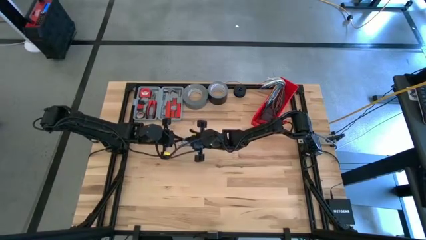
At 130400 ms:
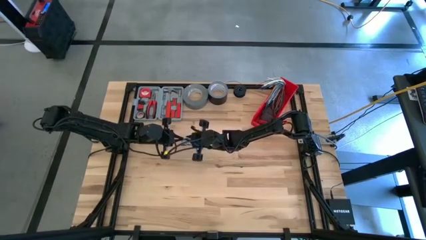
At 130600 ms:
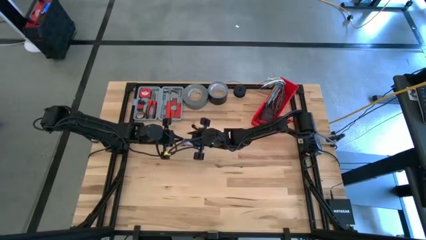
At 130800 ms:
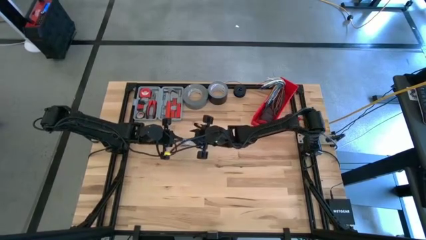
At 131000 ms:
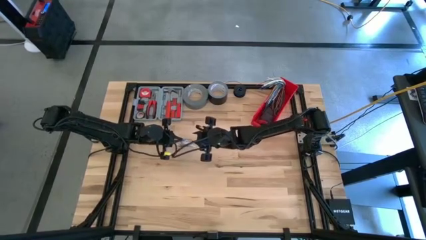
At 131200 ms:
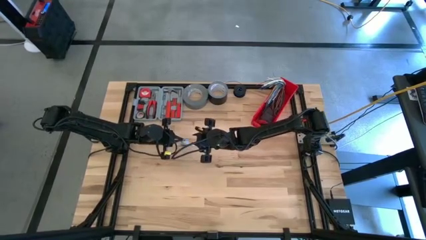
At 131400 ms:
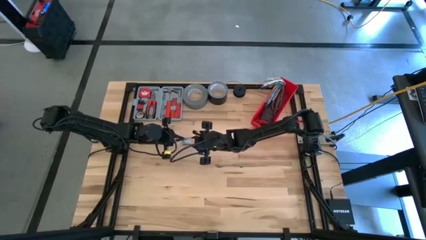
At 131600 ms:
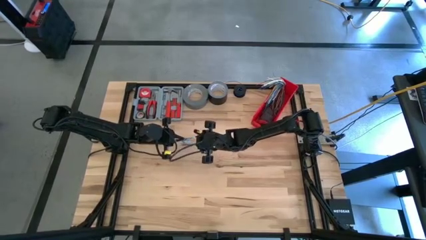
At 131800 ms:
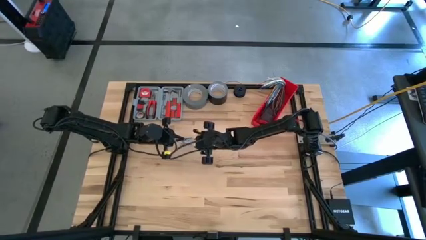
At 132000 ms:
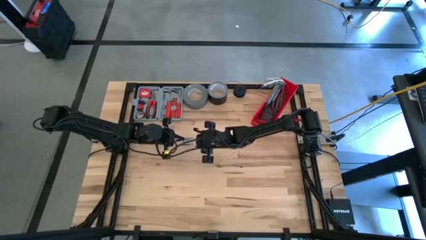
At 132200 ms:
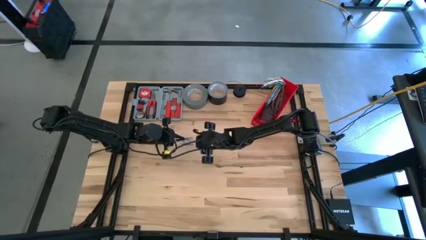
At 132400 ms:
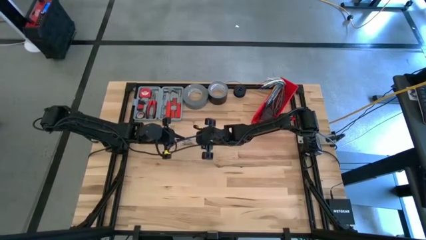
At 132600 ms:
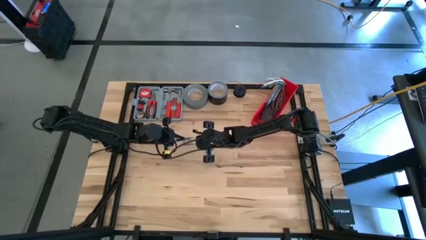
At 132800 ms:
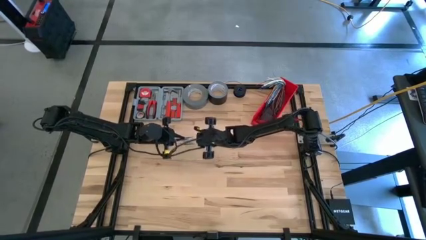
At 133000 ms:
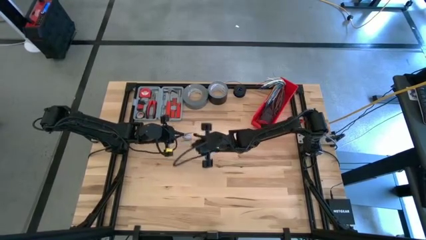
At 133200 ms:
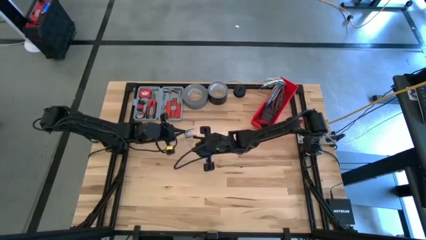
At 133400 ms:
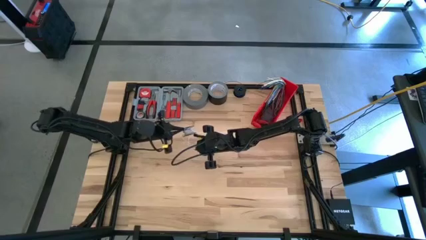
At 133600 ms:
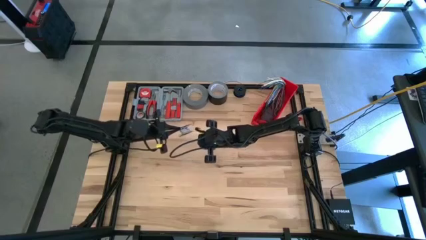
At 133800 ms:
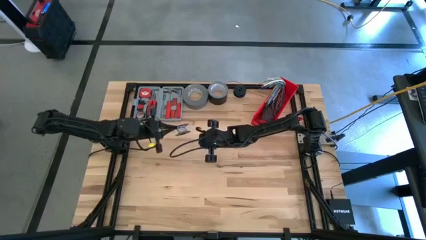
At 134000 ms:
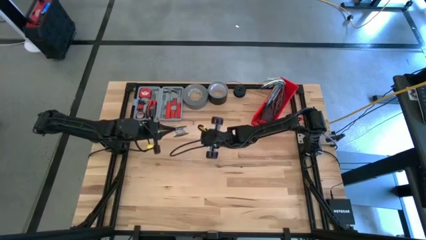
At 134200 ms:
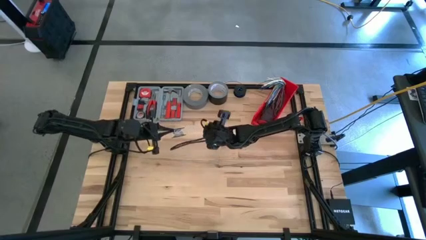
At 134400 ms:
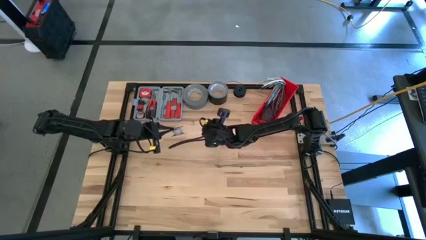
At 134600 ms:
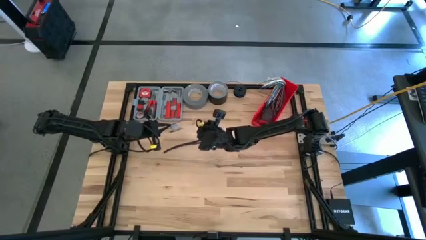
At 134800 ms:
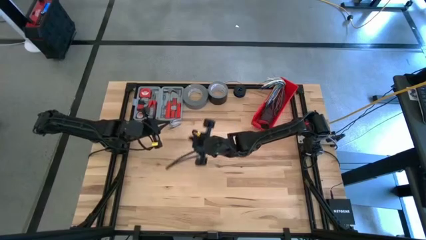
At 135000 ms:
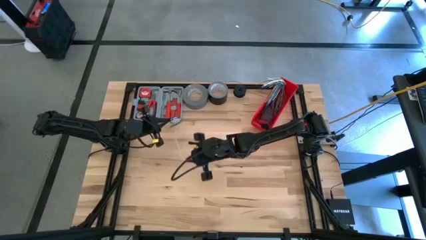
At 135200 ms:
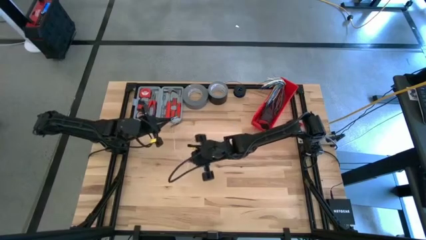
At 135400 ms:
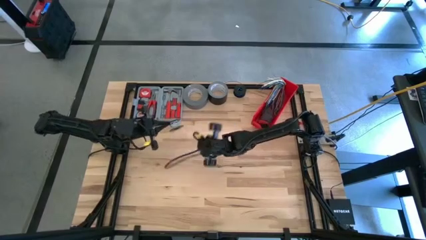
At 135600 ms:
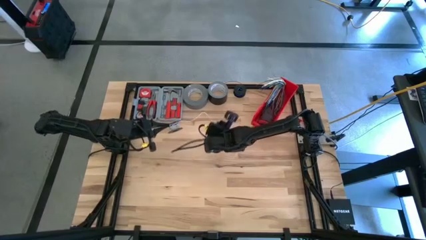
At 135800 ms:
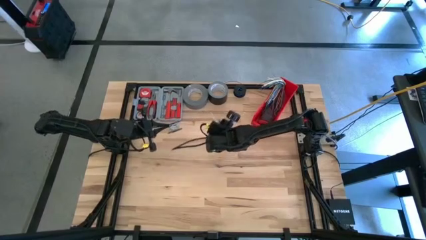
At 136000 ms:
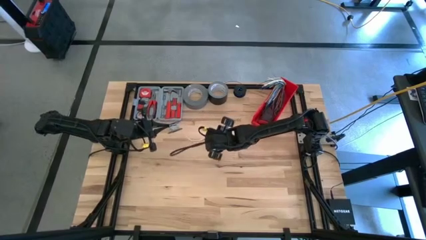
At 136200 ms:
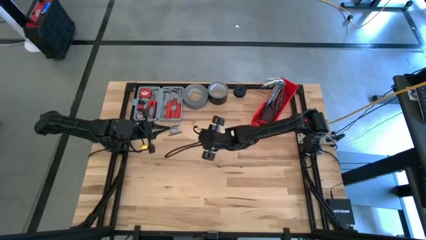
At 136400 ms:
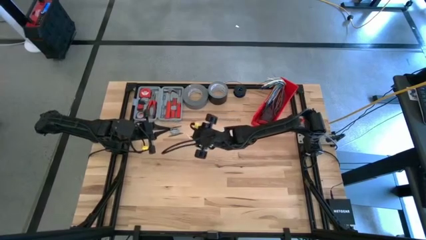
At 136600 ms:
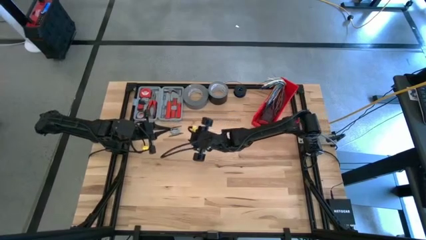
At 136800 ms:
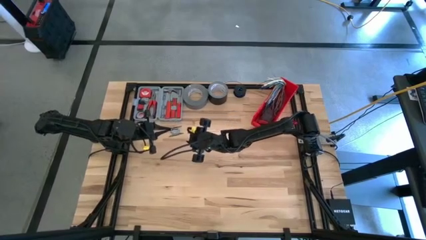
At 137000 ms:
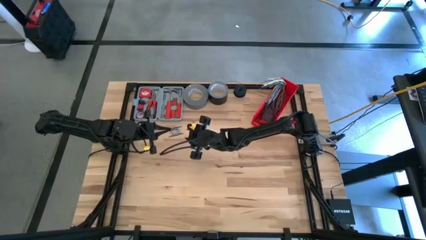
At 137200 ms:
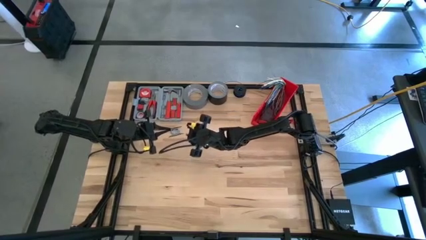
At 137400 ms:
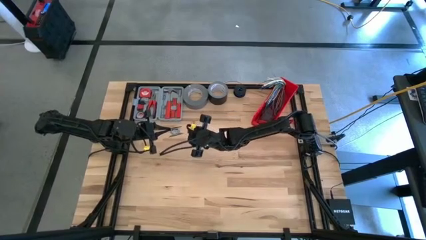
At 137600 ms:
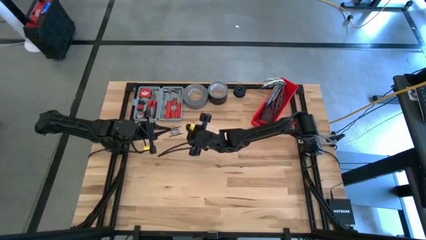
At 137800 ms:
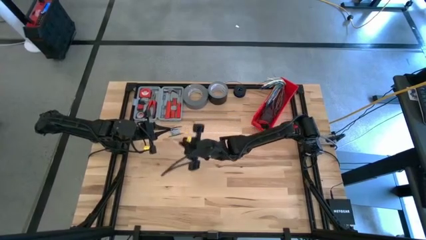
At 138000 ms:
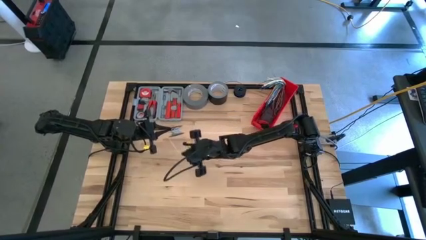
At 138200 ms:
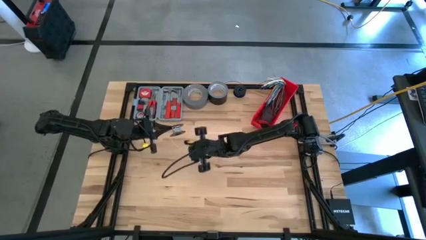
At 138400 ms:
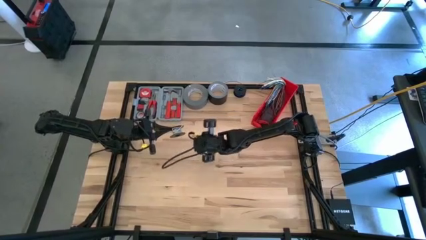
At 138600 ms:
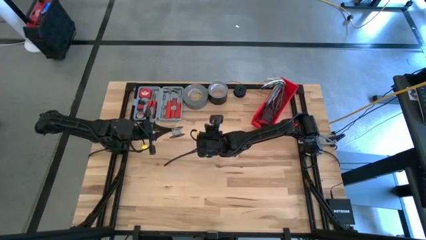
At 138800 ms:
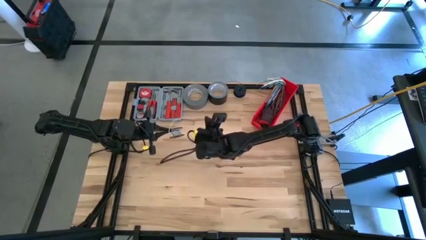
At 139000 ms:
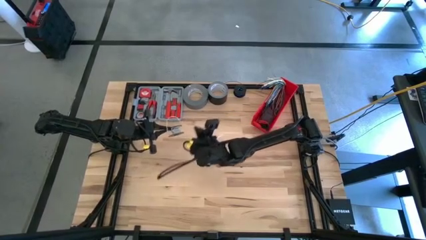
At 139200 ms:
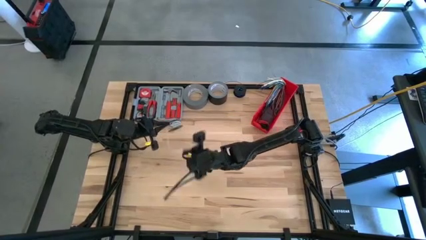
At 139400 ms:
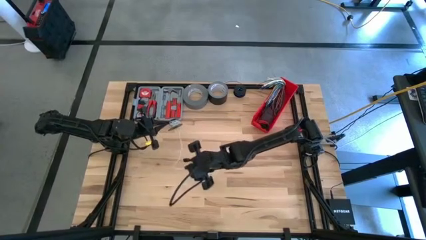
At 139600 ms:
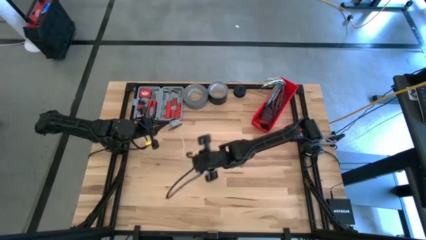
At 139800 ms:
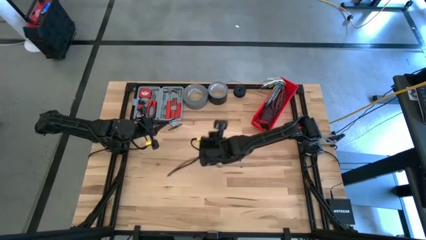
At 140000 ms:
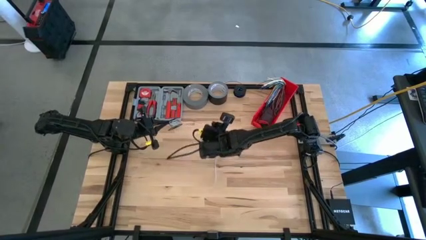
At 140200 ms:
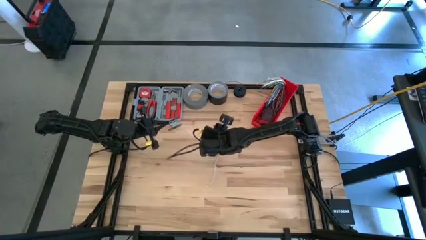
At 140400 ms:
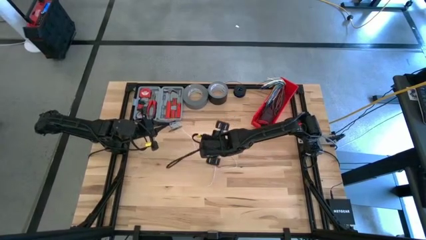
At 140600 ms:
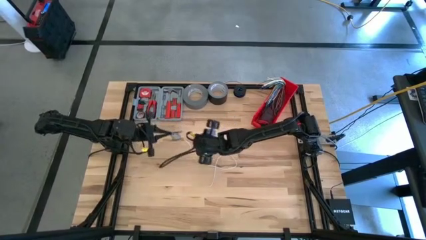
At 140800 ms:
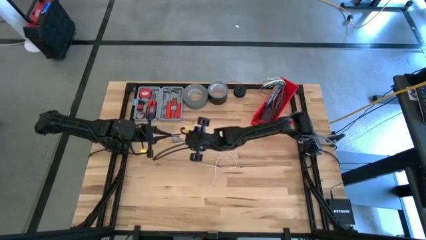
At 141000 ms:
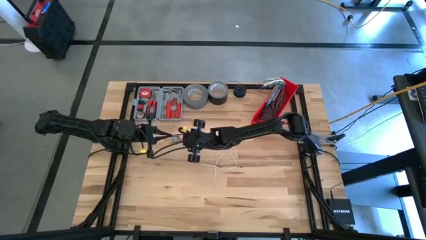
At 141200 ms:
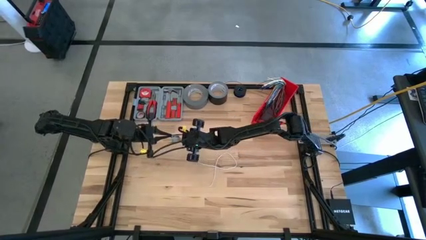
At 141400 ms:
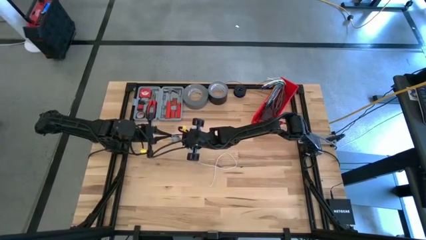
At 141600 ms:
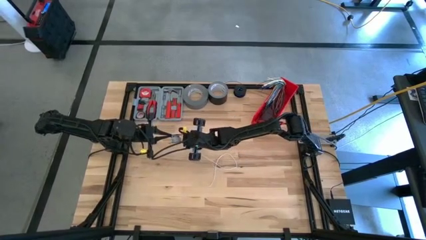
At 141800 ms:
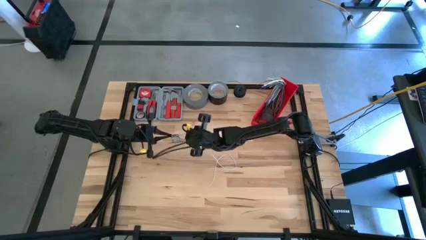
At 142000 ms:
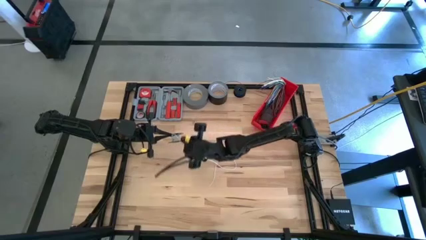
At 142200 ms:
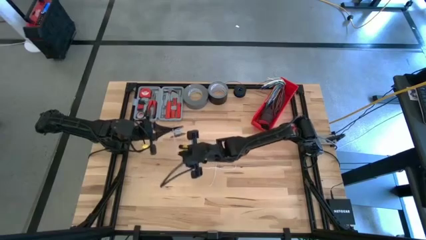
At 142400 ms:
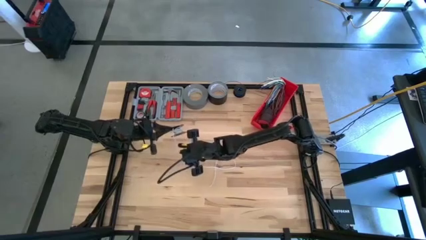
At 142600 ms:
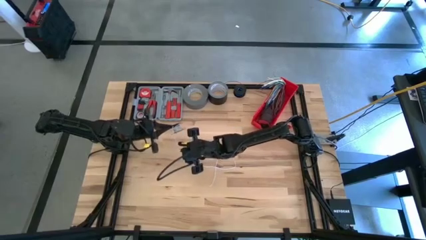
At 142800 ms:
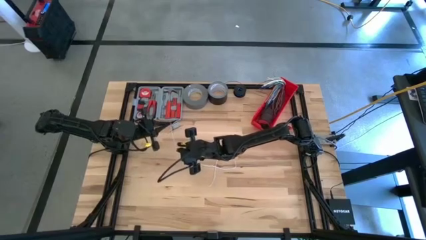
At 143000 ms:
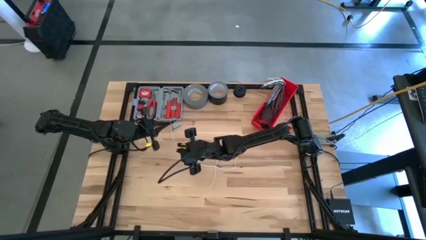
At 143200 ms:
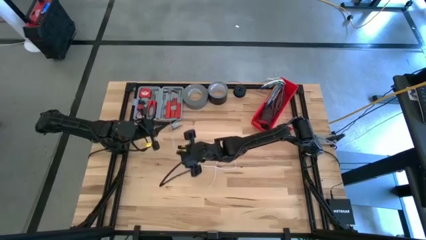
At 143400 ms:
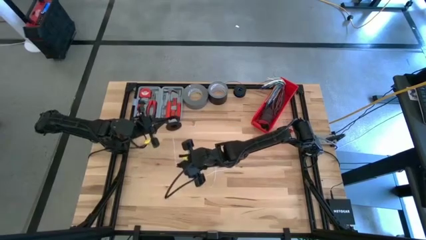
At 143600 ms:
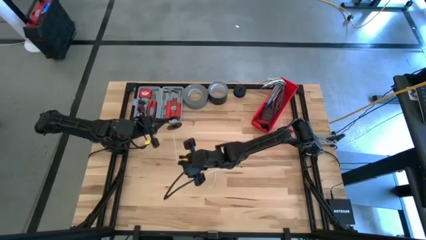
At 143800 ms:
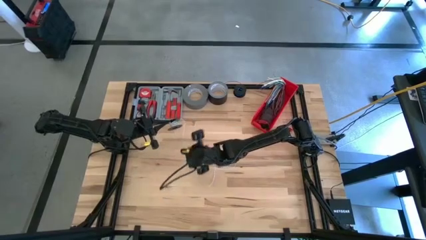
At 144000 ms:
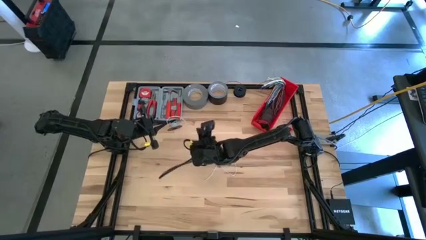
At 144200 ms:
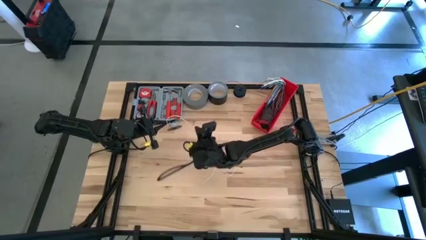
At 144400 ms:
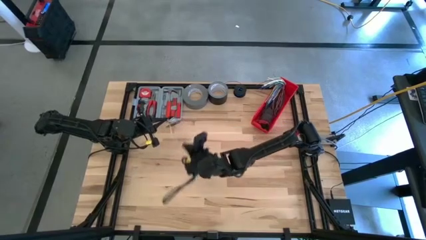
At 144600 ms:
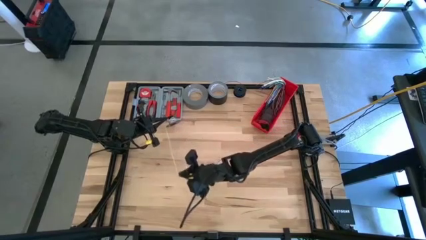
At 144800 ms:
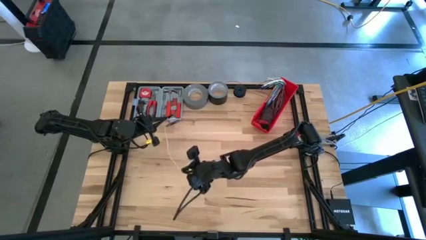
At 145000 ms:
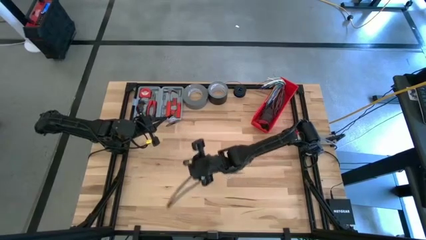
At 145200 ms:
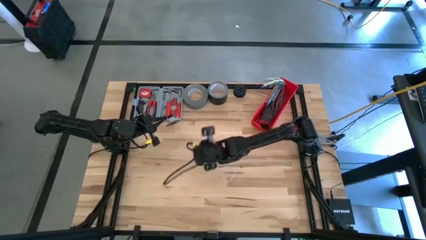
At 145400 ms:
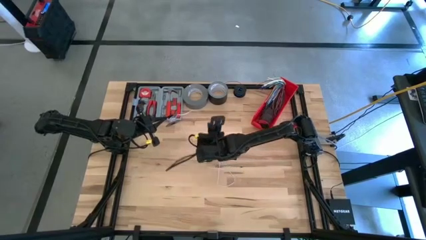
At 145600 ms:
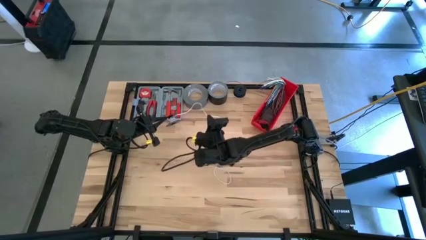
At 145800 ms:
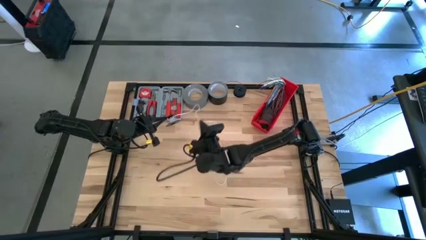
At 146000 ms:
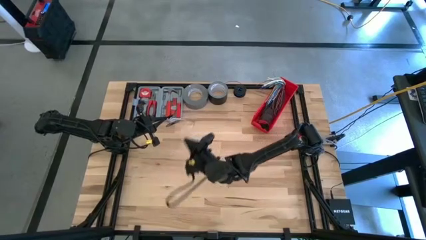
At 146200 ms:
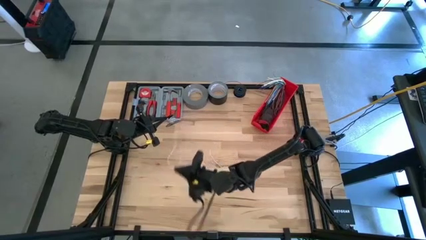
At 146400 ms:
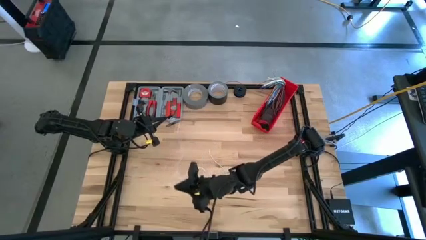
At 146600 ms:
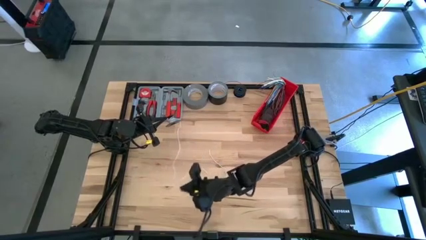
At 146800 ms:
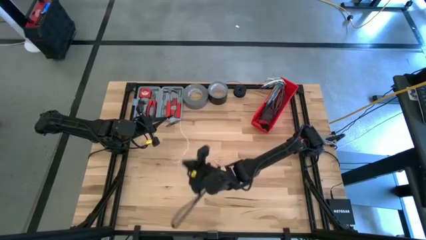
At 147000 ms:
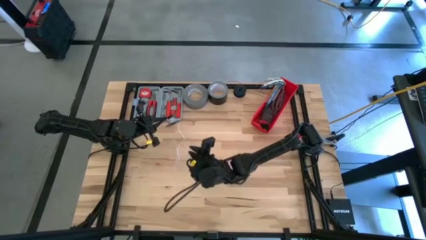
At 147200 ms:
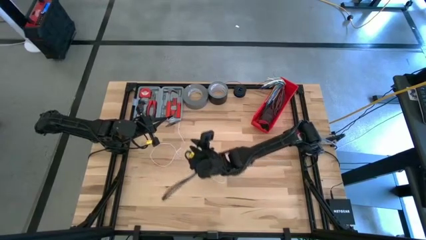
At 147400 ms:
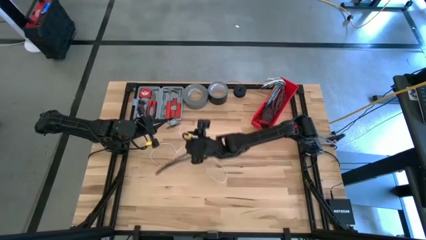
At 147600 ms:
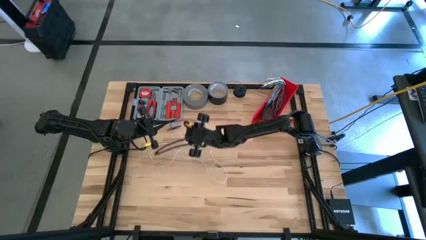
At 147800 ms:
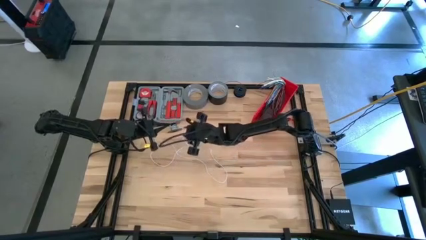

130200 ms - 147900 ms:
Task: Coil cords
Uncoil the white wire from the black spool
